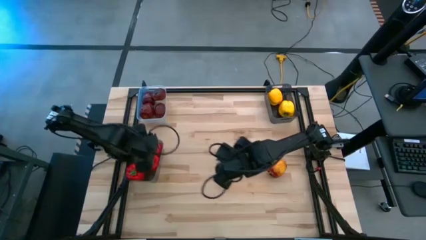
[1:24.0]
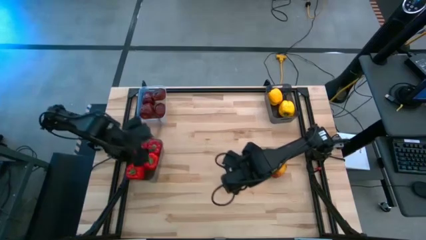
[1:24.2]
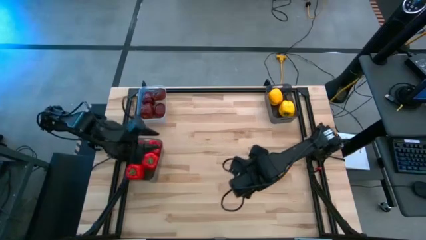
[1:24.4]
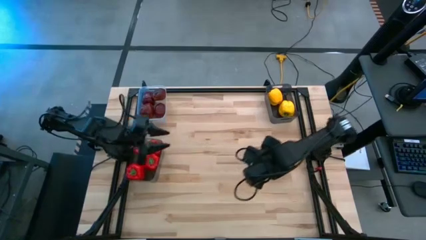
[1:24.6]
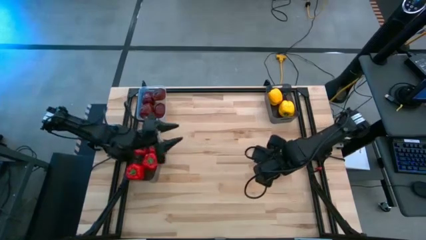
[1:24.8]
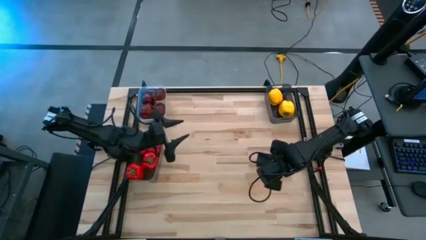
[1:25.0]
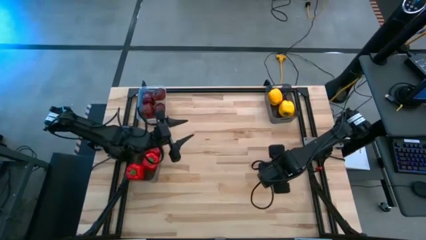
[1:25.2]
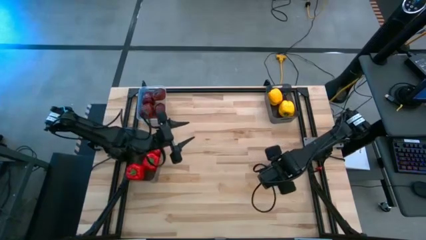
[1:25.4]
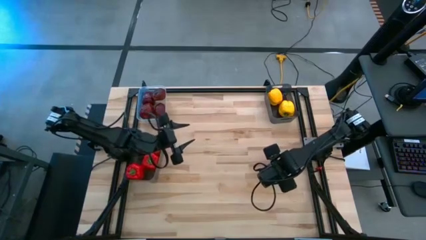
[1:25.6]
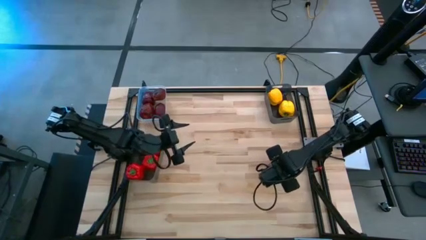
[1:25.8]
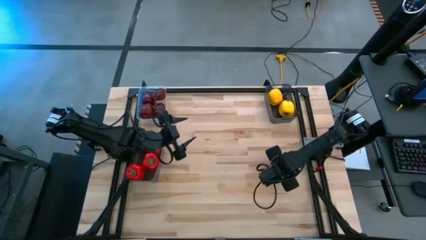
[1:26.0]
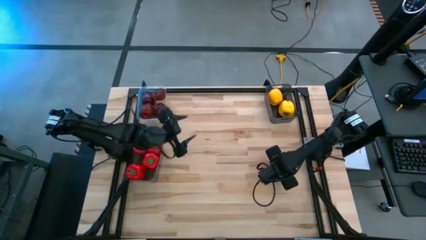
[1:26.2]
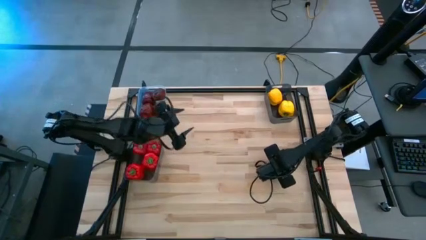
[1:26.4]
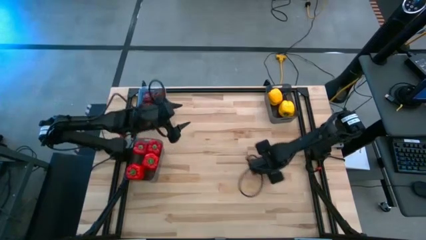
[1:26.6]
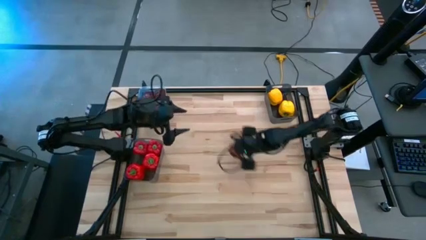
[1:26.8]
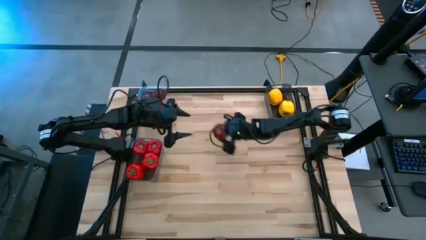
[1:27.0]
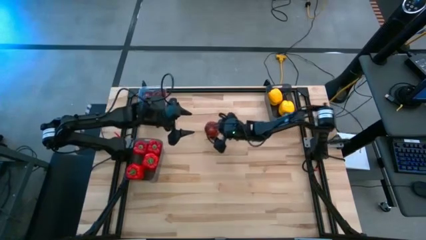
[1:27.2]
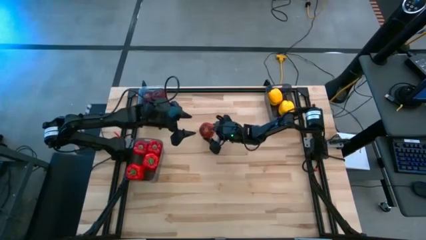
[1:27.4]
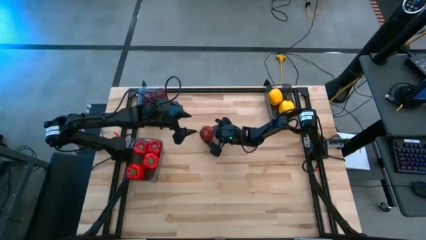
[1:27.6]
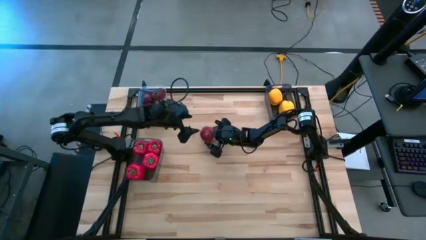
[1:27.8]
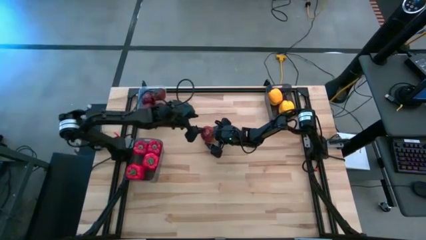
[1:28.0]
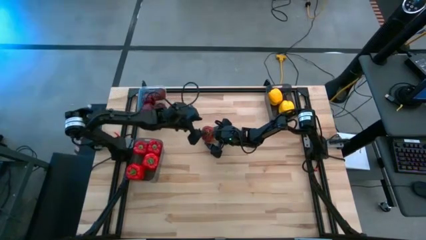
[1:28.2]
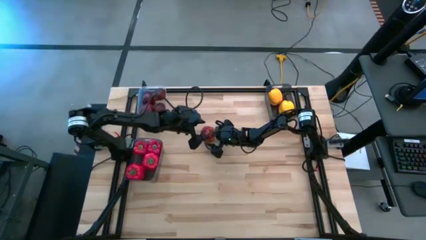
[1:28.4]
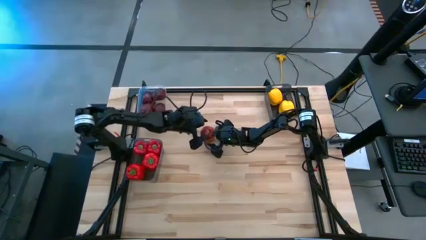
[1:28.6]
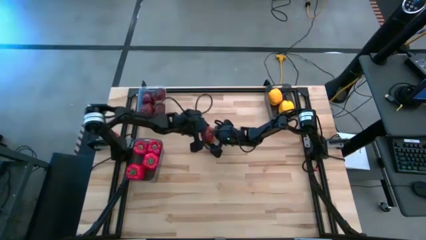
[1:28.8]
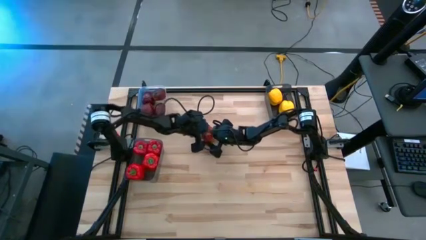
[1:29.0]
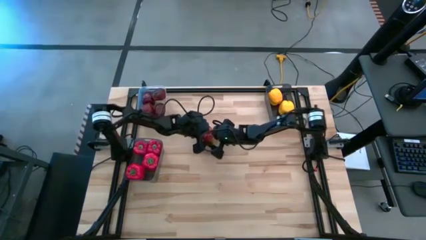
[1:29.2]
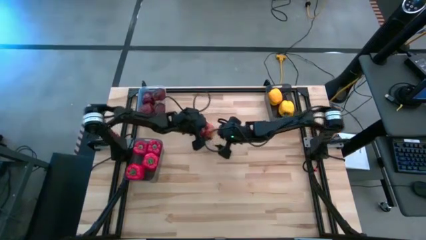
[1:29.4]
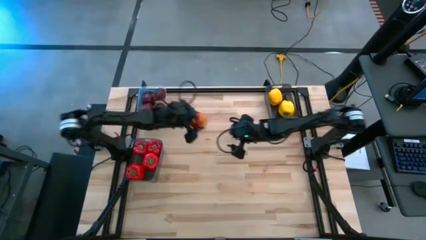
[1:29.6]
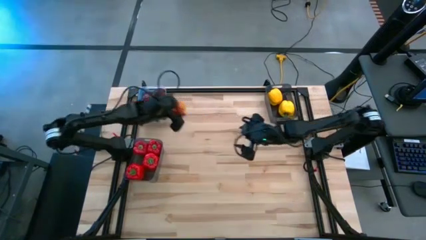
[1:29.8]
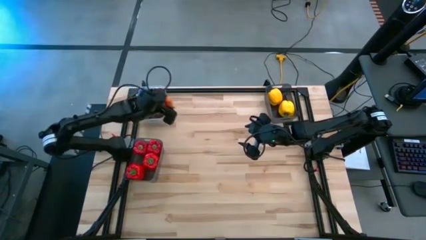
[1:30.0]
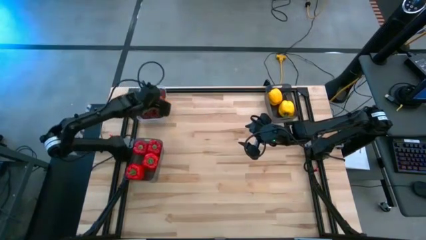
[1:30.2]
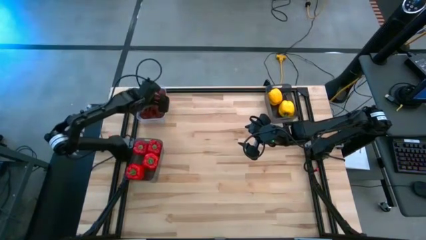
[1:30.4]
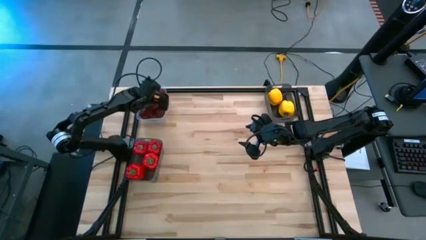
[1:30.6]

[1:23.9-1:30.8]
Task: Sort produce into baskets
Put the red apple into the transparent bin

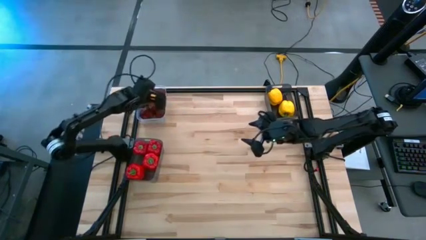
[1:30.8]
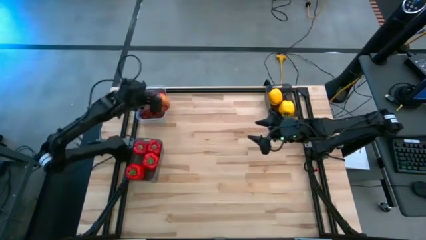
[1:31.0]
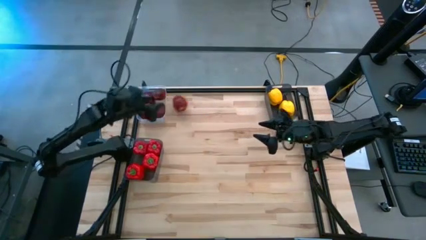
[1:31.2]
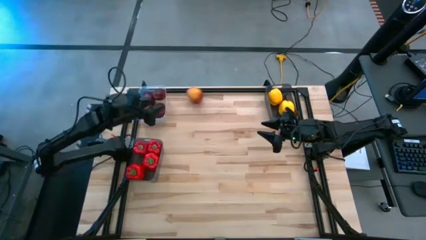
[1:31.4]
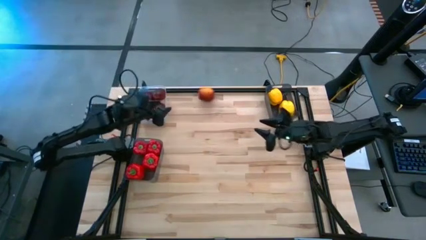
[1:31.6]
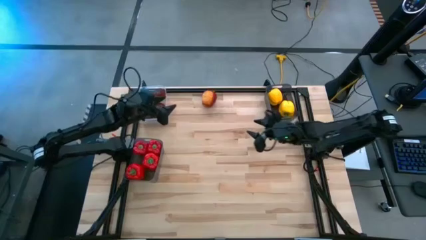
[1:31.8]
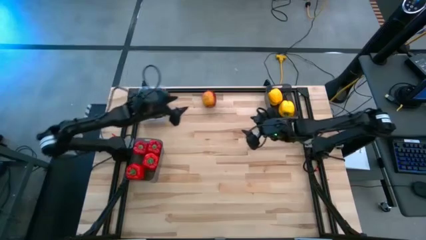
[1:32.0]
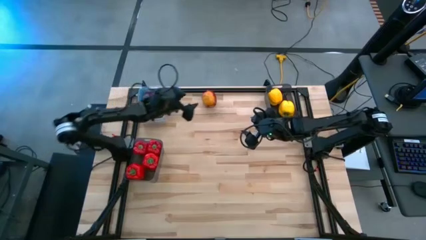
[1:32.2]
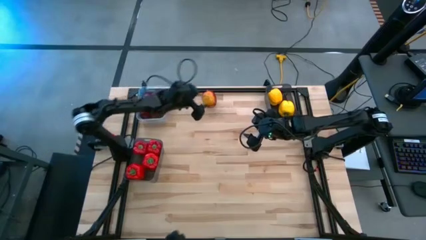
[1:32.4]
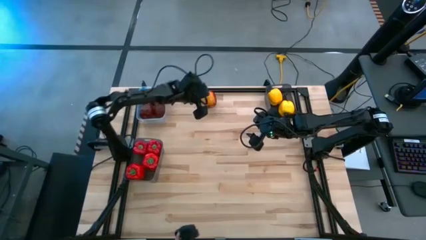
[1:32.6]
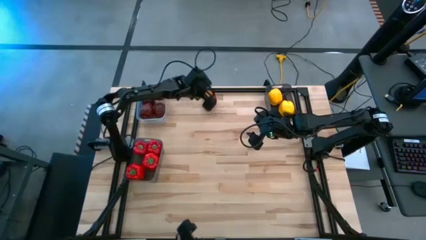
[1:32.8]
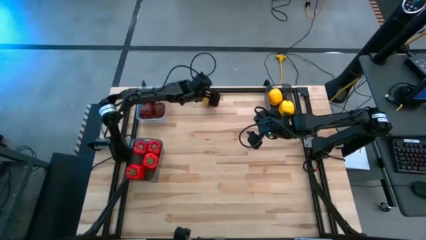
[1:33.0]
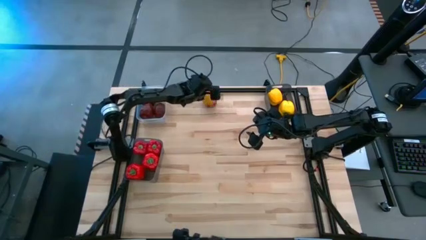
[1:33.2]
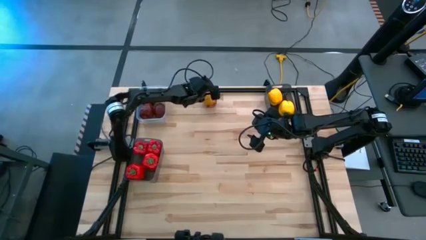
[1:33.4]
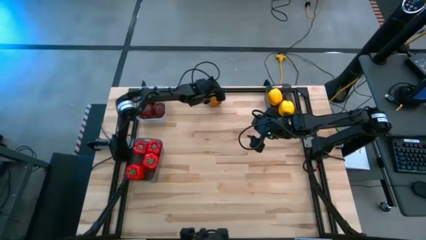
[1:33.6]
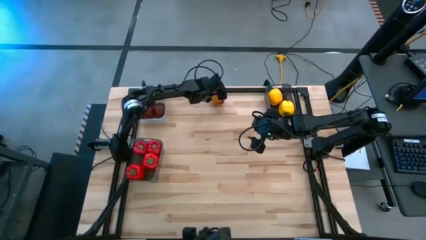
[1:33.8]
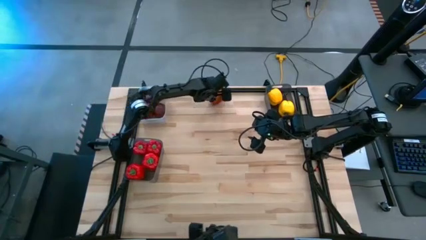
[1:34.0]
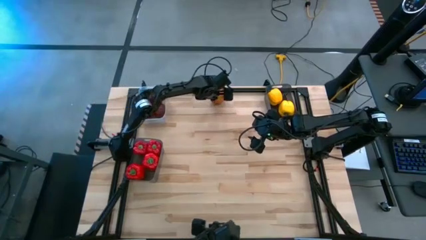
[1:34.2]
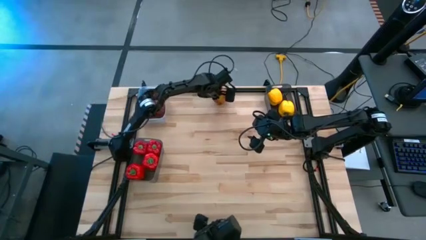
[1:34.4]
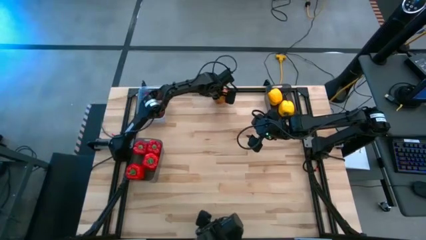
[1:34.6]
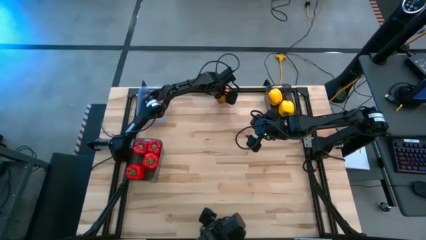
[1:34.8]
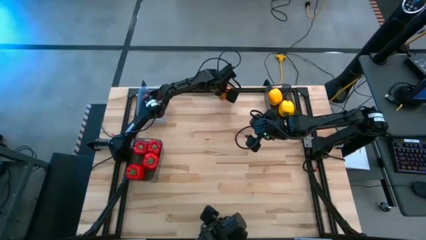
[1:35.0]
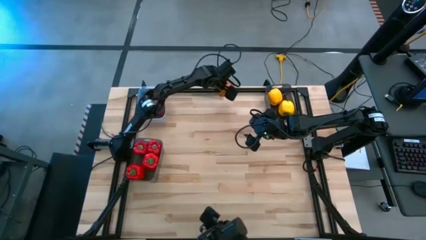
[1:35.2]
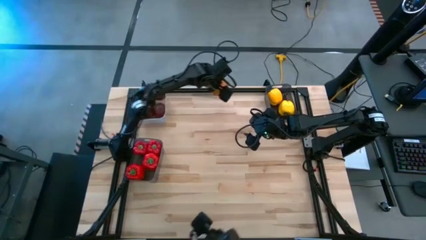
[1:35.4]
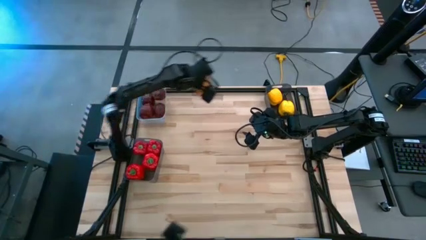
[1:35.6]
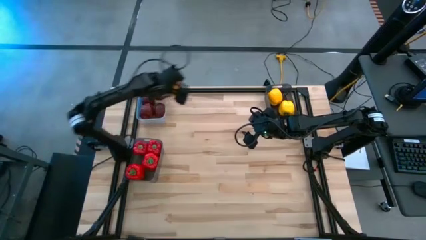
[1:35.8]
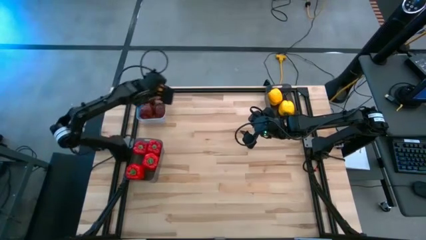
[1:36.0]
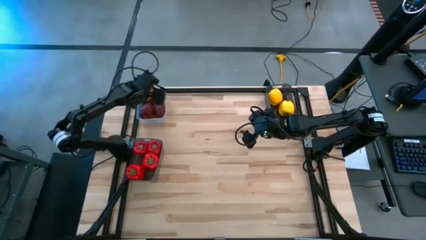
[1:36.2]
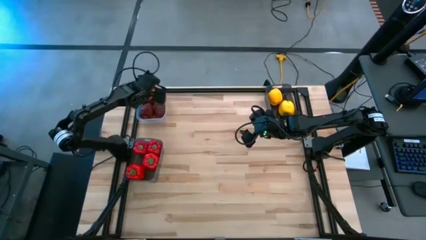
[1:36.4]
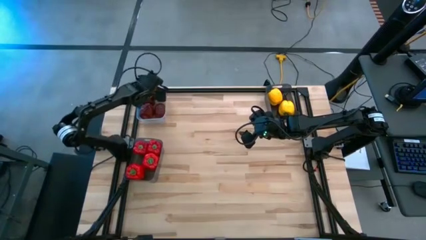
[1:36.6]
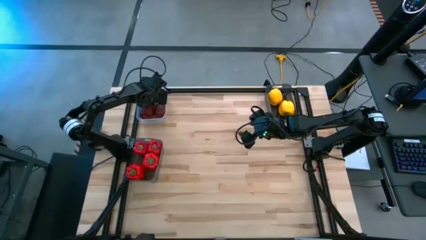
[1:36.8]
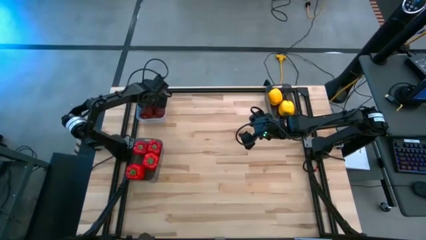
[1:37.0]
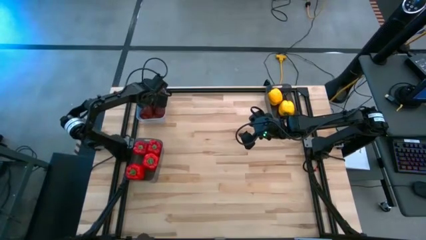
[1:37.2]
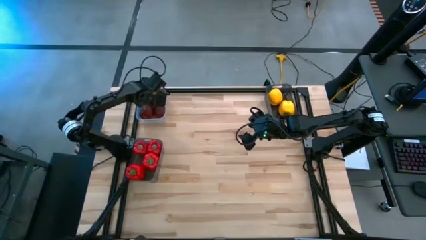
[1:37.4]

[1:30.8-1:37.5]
Put the red apple into the transparent bin

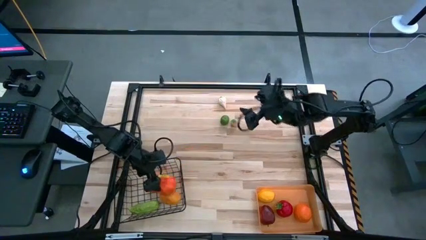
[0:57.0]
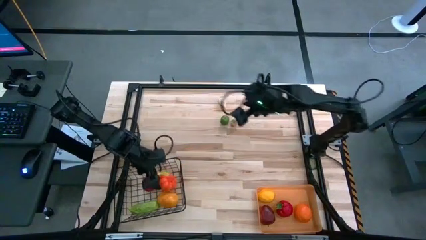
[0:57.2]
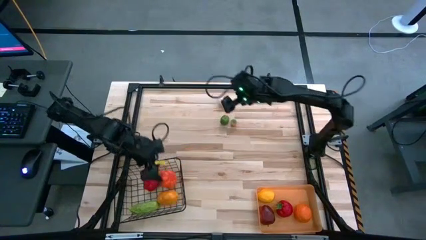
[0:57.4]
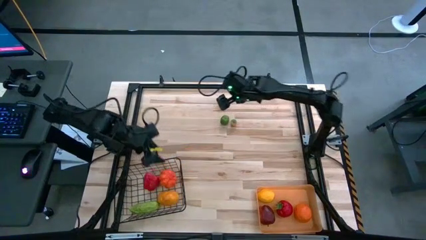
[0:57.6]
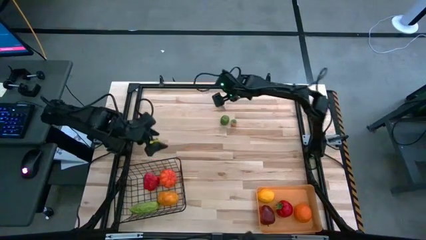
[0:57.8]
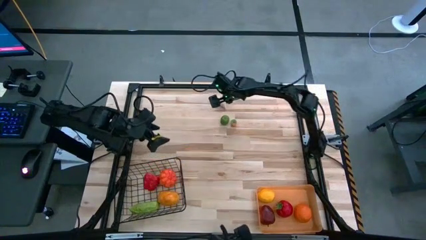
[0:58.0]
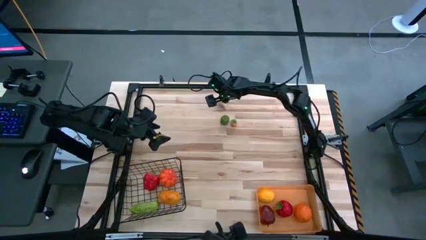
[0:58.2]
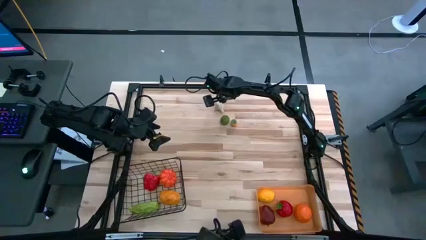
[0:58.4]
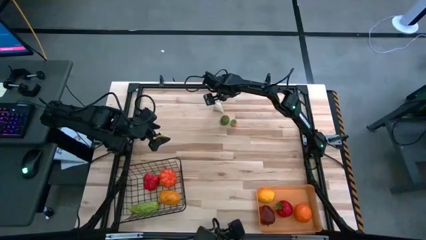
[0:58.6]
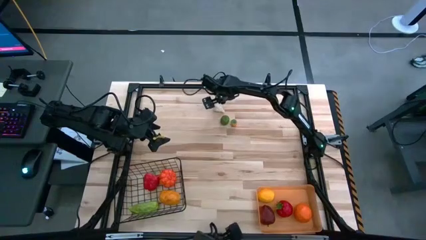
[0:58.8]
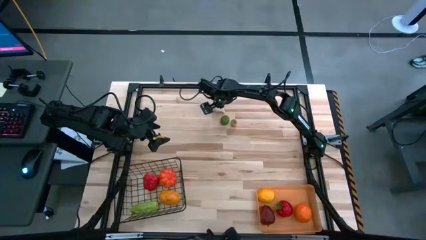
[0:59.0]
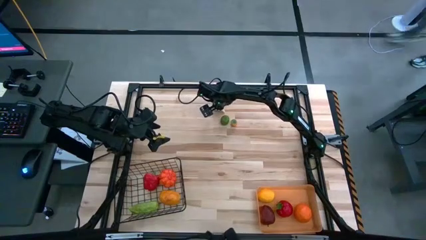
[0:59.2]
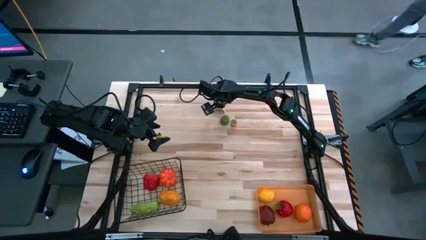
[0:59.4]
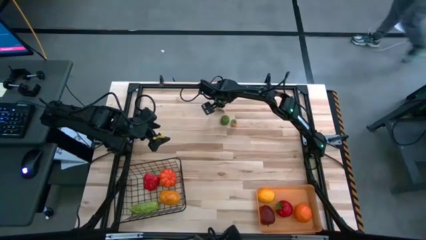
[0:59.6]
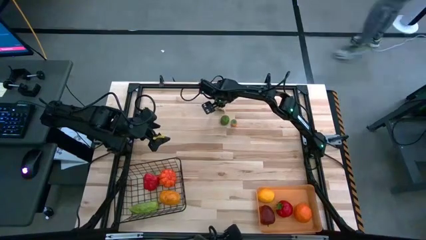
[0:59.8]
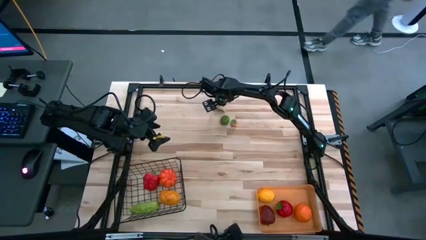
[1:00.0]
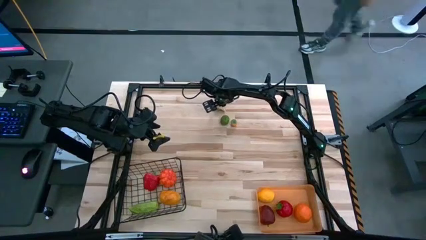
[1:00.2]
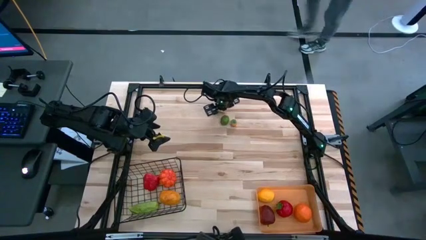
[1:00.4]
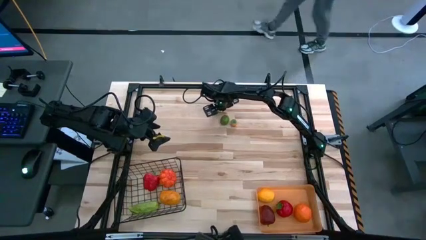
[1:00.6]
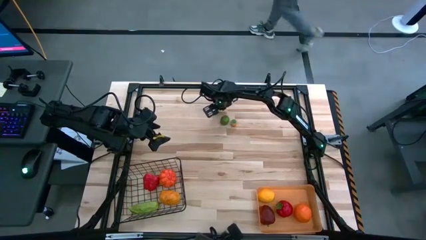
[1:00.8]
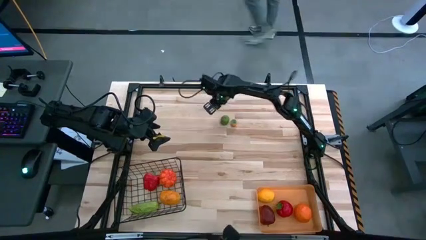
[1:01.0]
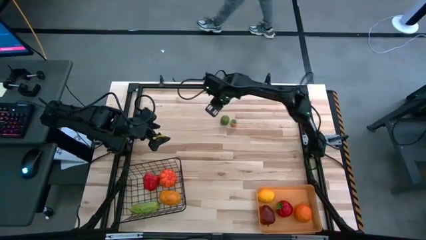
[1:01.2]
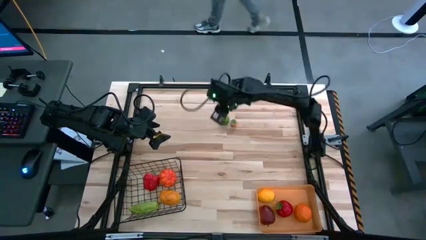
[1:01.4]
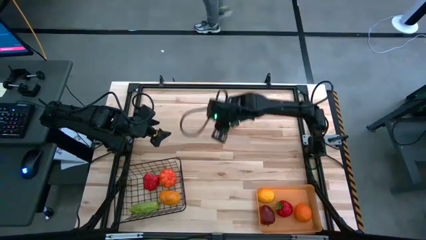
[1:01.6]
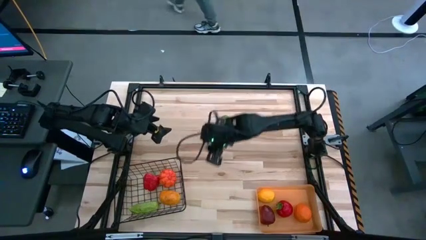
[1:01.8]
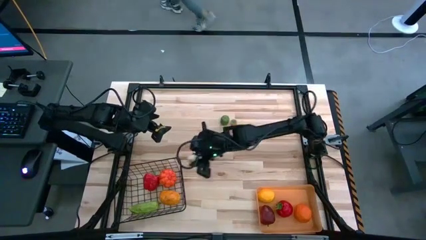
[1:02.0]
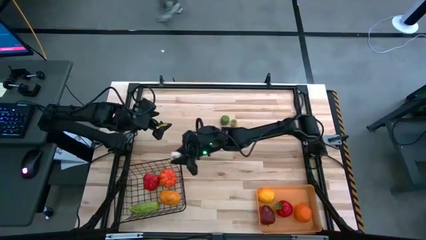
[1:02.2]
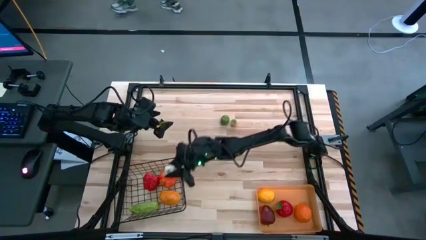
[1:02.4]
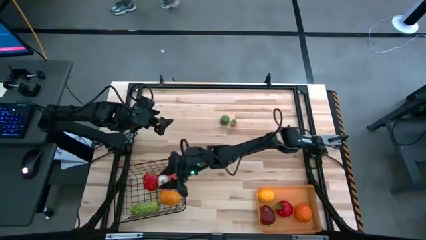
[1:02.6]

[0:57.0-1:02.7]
Task: Sort produce into baskets
Put the white garlic into the black wire basket
